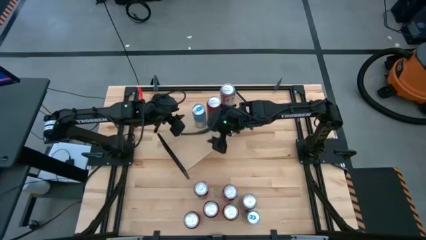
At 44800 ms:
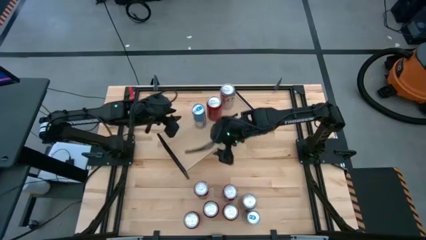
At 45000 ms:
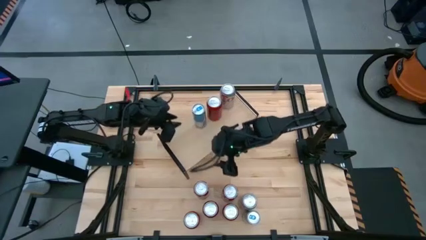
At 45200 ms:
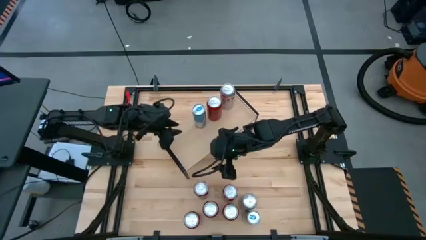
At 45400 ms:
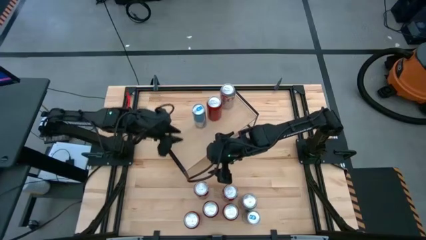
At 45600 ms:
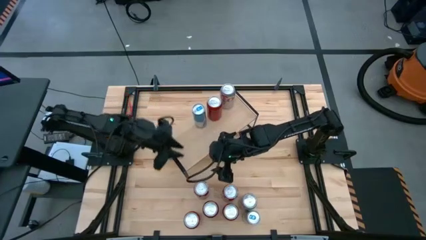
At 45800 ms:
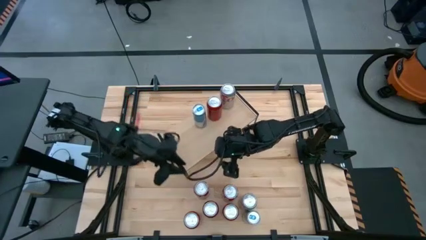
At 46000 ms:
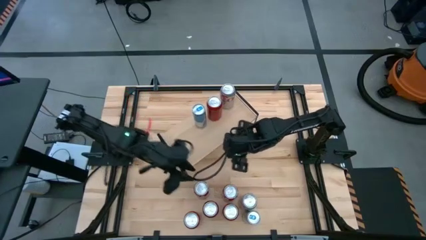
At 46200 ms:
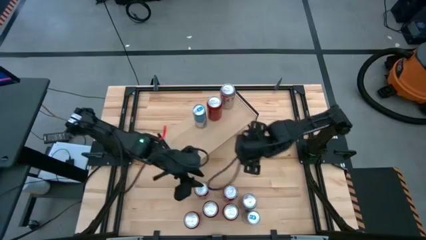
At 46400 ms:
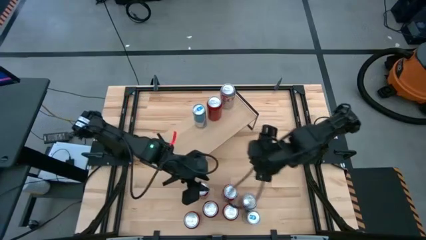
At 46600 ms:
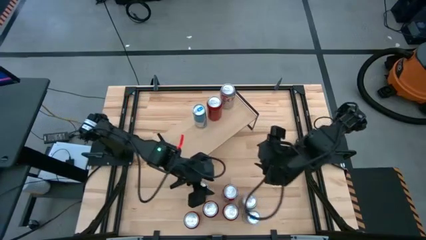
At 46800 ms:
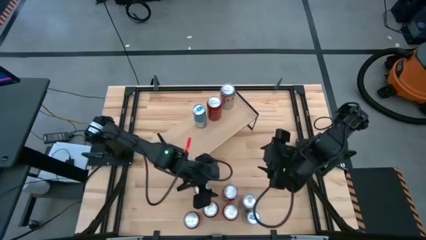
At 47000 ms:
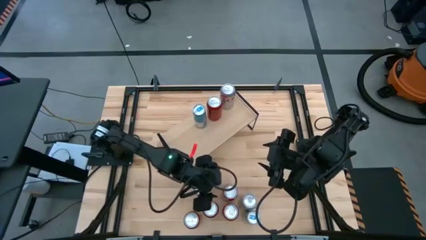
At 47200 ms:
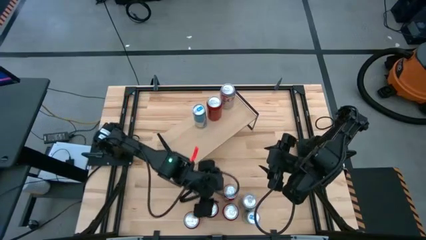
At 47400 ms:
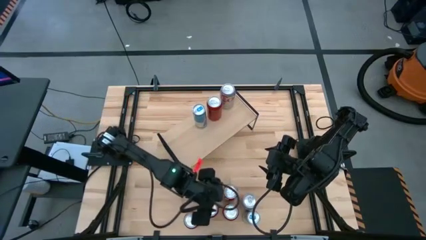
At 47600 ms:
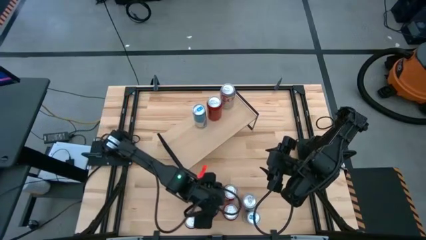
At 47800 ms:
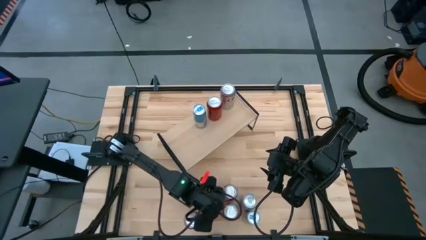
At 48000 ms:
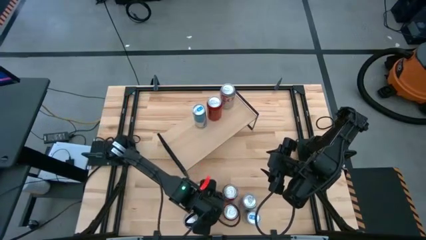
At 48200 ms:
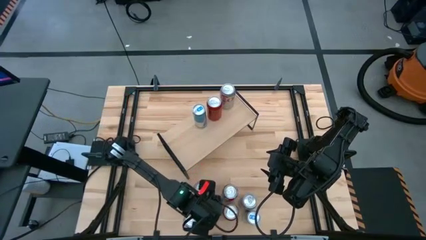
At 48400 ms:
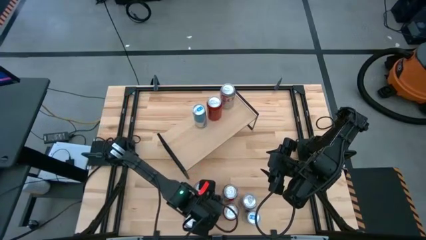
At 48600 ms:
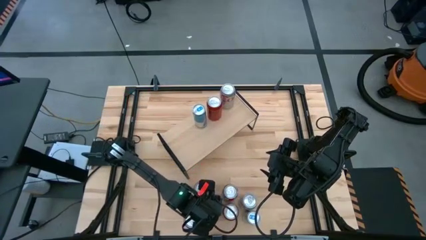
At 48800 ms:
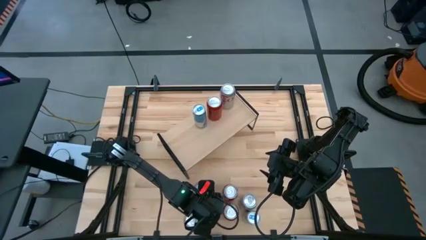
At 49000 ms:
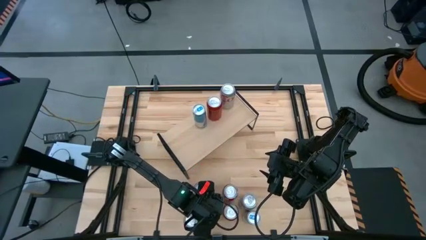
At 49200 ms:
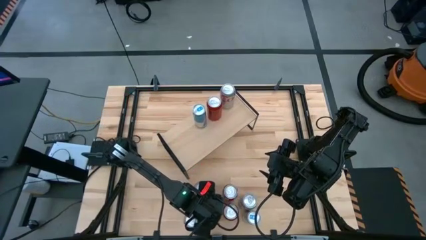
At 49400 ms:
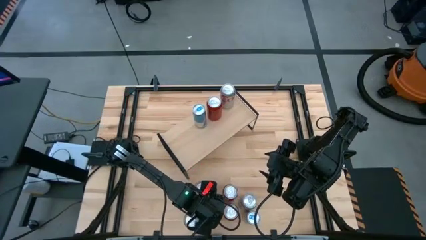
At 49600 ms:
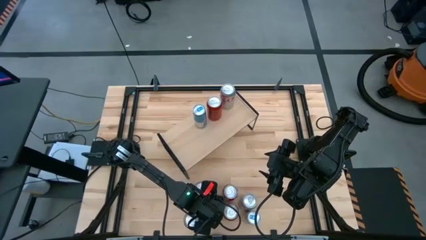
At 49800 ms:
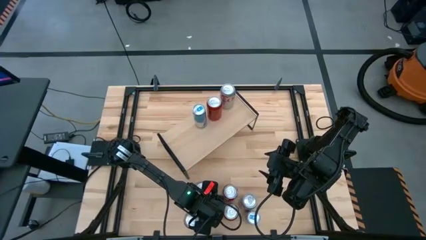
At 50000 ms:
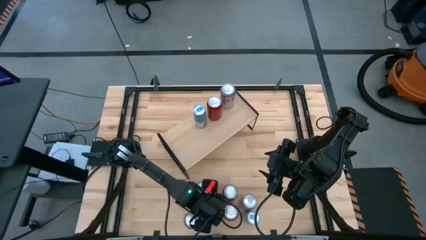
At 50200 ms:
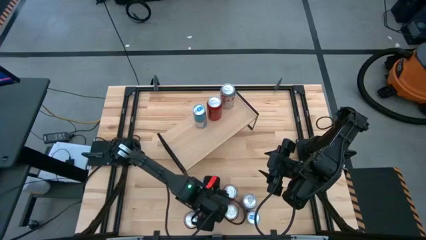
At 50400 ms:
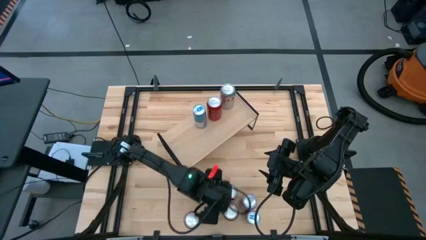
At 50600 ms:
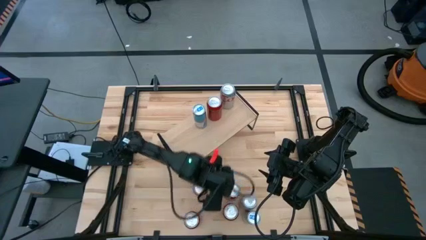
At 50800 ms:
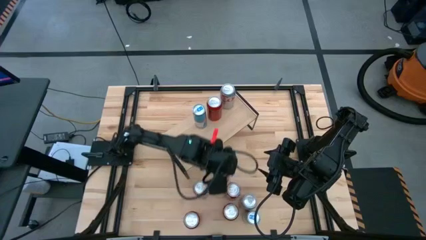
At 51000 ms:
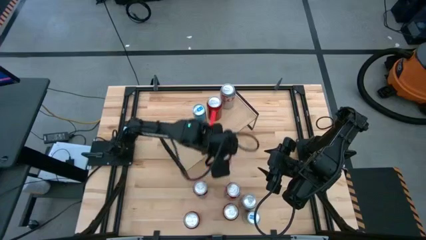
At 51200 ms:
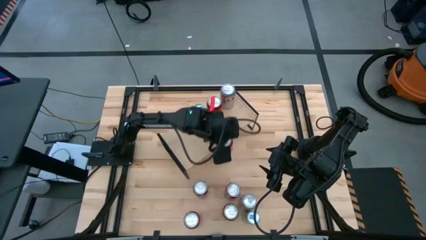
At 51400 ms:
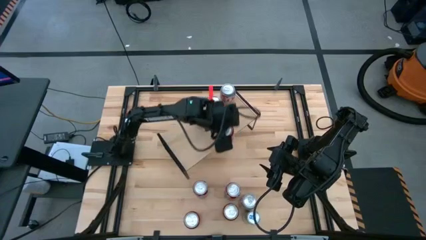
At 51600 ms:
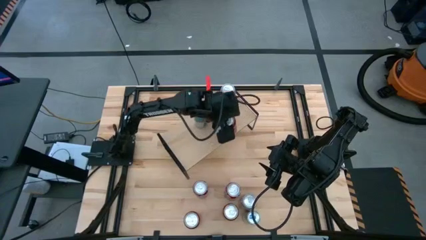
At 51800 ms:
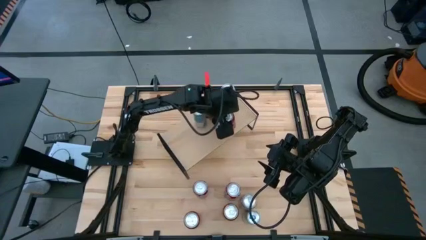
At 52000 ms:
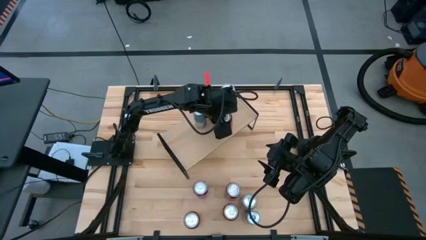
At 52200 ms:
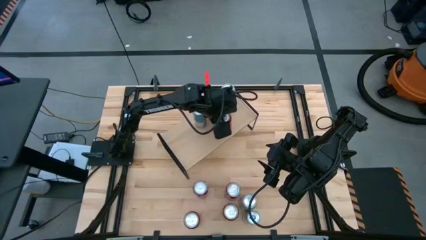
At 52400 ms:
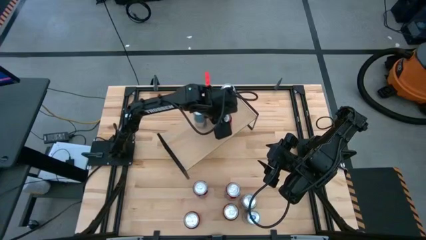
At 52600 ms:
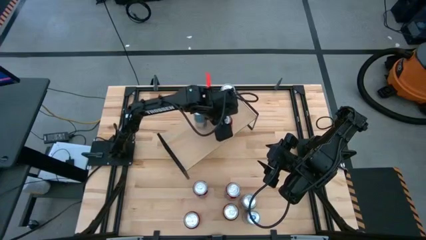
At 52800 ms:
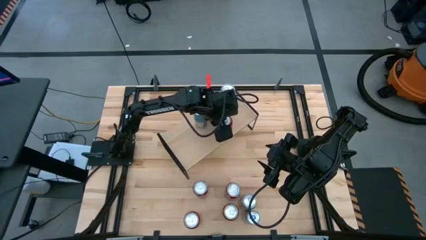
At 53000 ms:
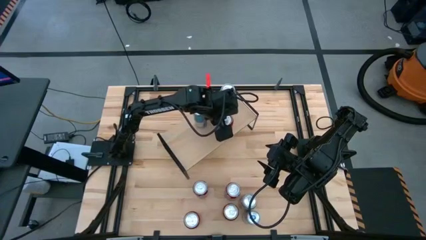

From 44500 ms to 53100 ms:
Task: Place canned beverage on shelf
Put the red and black soda can on the shelf aligned with the other red and black soda can

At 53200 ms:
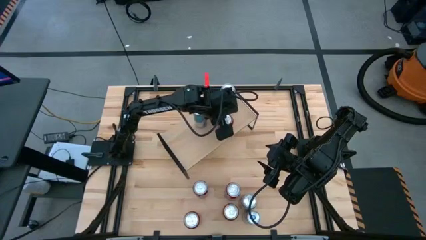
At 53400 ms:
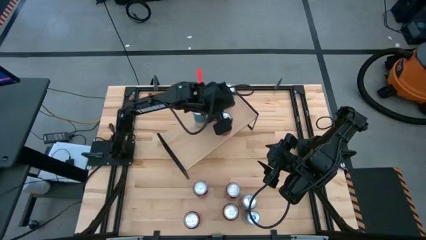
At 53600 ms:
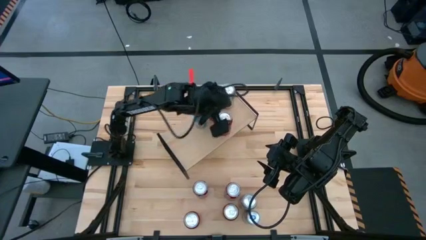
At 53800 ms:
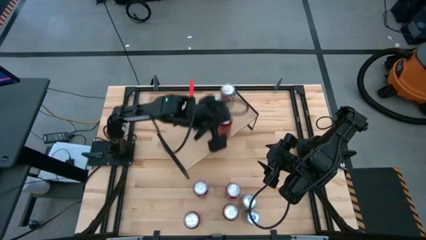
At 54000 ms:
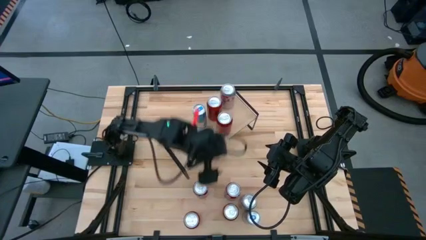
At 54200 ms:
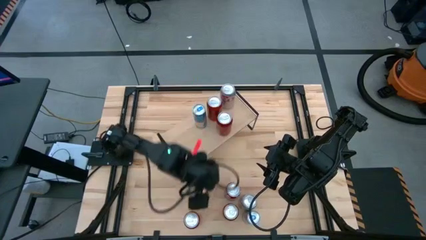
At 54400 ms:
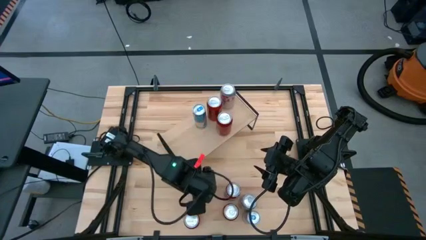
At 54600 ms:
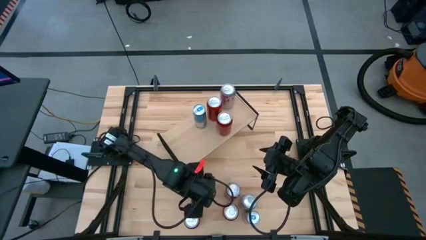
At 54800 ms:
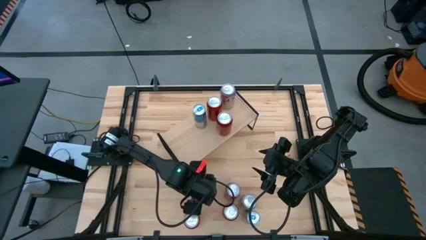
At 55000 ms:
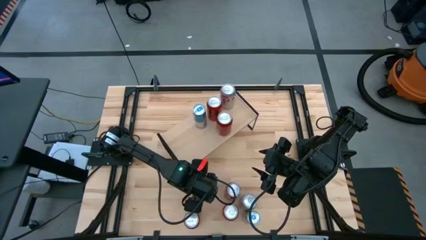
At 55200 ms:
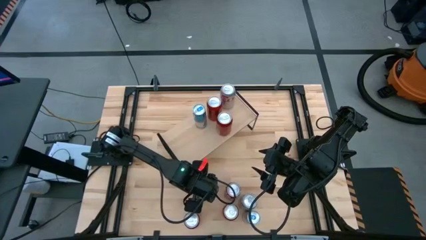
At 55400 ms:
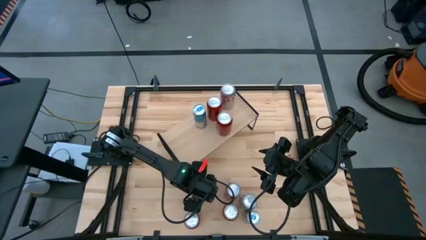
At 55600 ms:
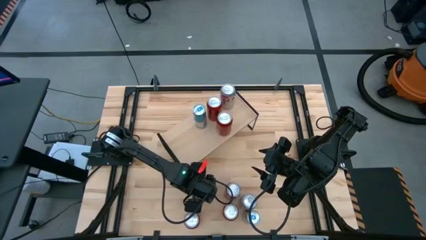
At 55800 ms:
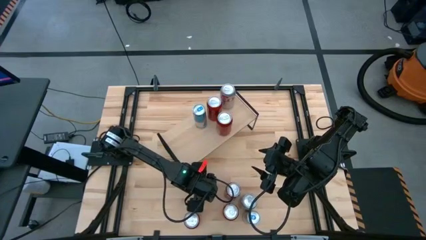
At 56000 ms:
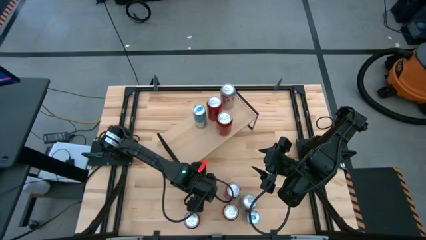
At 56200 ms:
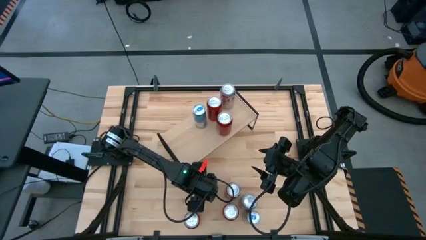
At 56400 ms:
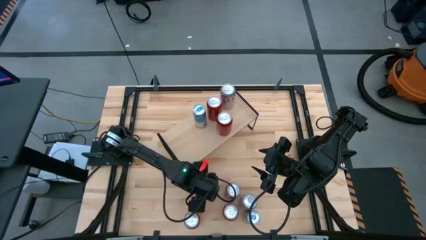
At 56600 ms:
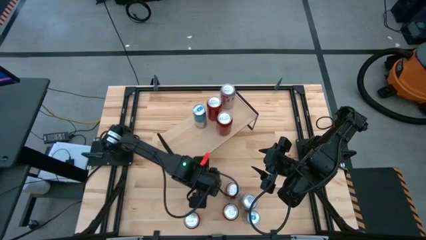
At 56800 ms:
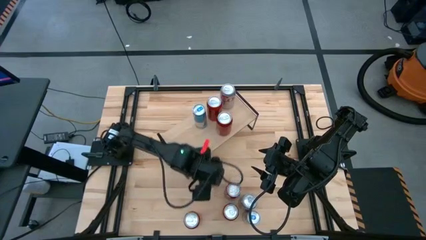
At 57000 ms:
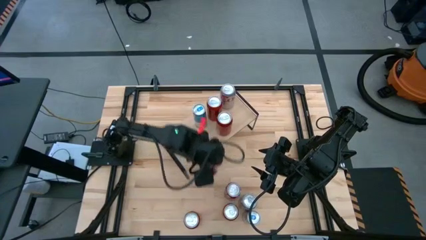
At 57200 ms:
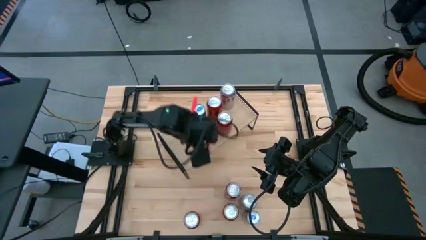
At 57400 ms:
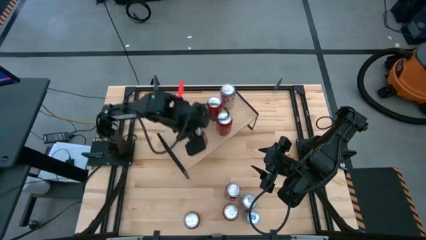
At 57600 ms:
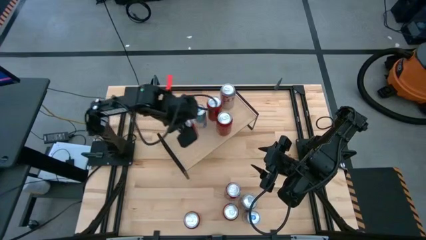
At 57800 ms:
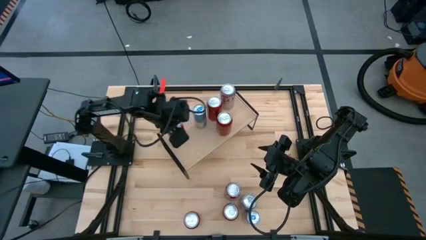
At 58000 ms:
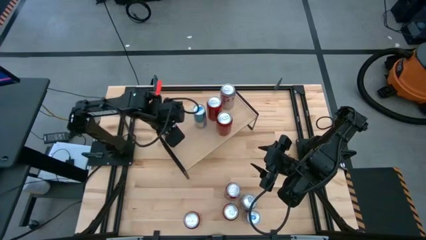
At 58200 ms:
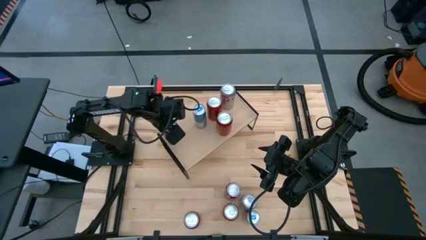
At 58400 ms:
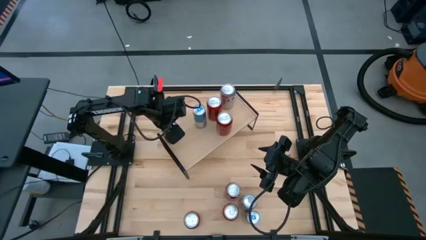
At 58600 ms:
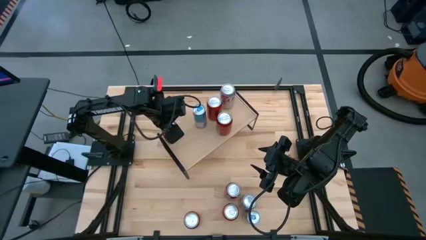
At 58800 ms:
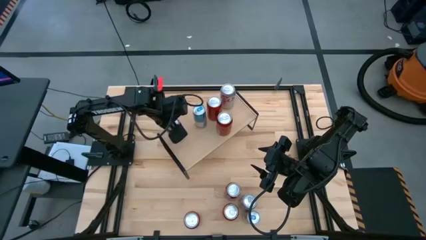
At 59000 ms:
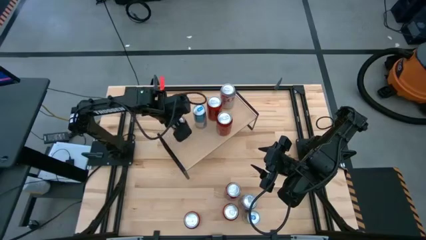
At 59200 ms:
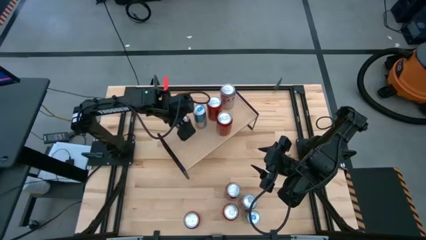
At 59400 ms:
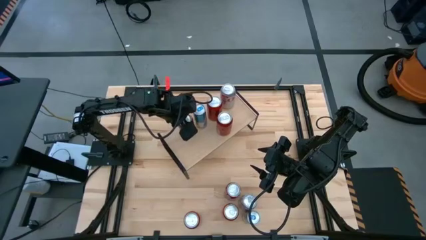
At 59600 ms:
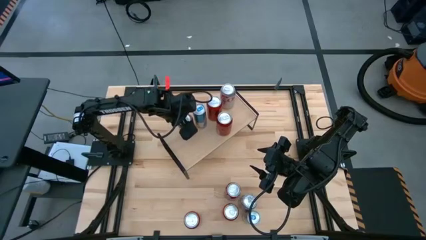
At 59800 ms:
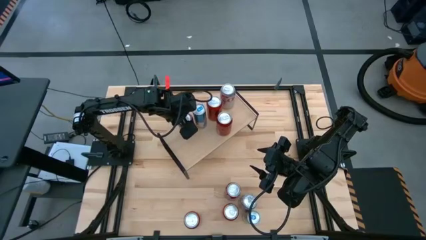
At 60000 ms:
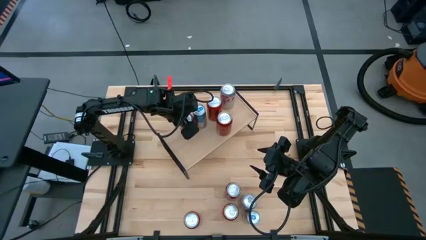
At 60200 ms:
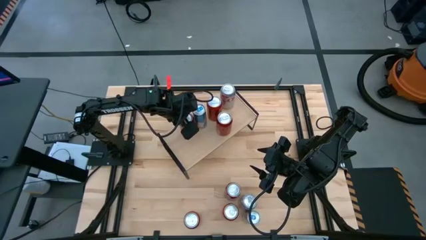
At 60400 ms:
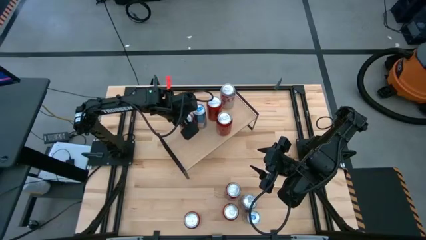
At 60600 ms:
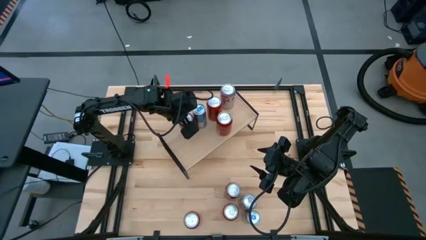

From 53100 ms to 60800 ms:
Put the left red-white soda can on the shelf

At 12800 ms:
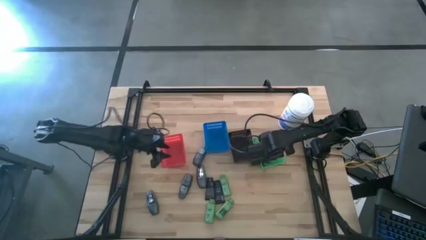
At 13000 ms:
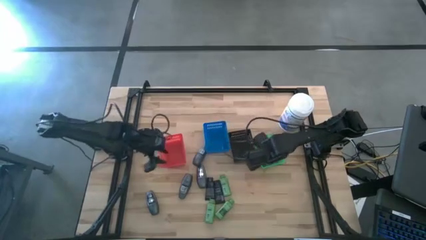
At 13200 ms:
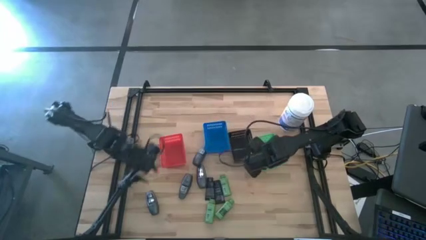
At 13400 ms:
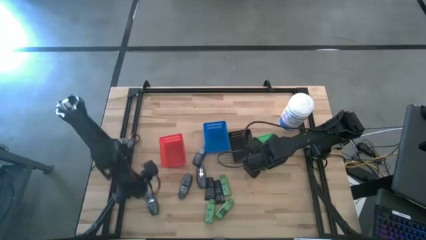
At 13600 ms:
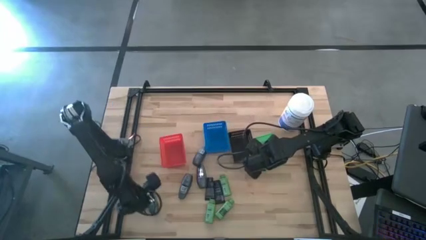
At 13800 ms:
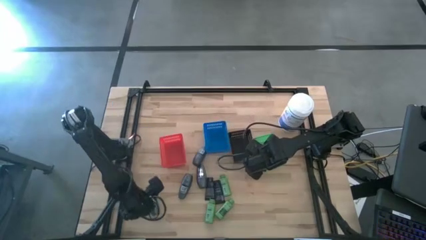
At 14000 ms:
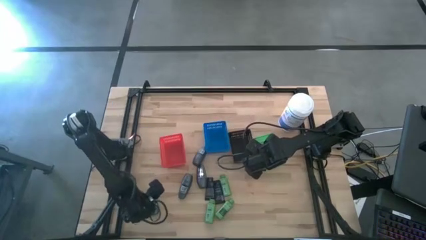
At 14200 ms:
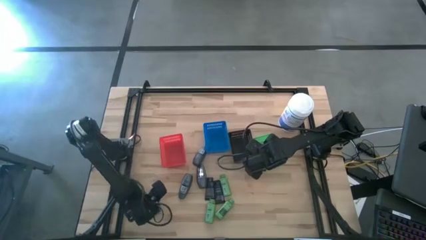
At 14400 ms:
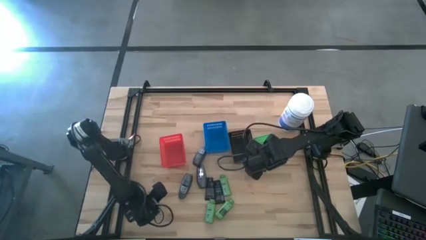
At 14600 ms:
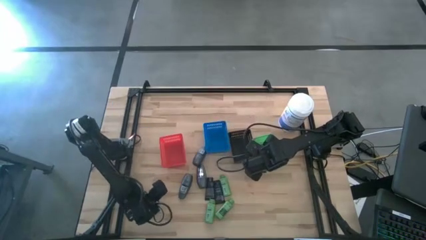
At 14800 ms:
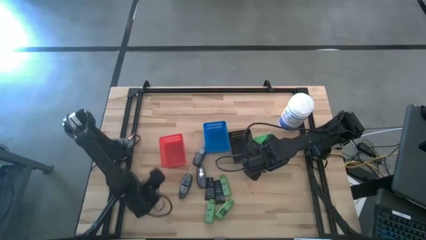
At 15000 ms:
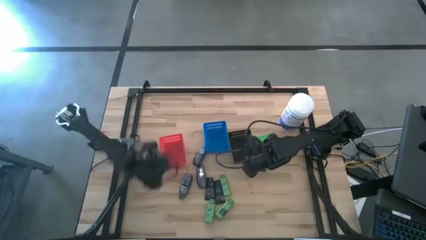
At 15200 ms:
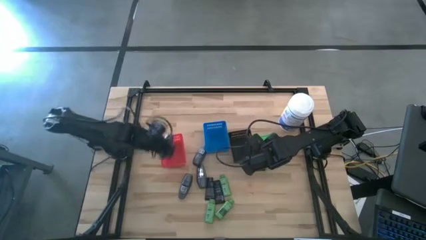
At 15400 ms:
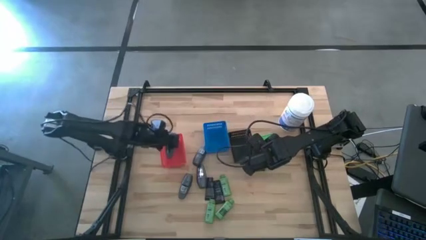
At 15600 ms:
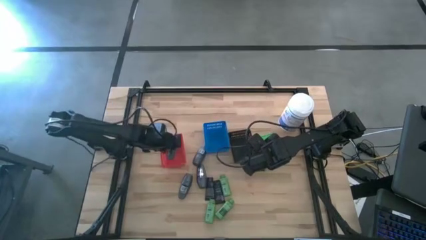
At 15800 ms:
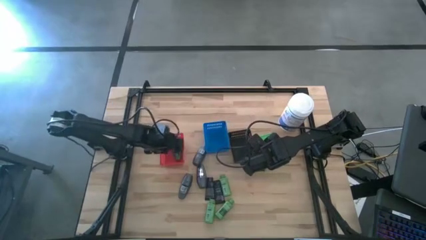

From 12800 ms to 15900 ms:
Task: Pick & Place Travel size toiletries
Put the black deodorant into the orange bin
